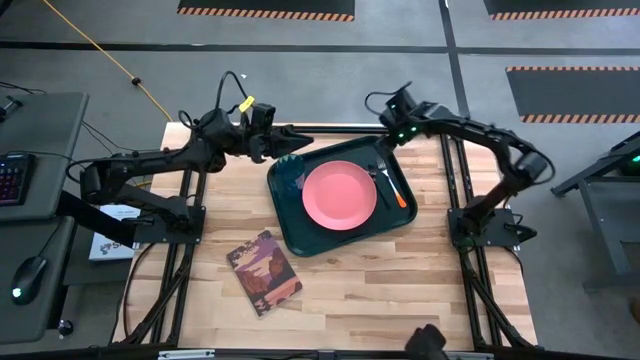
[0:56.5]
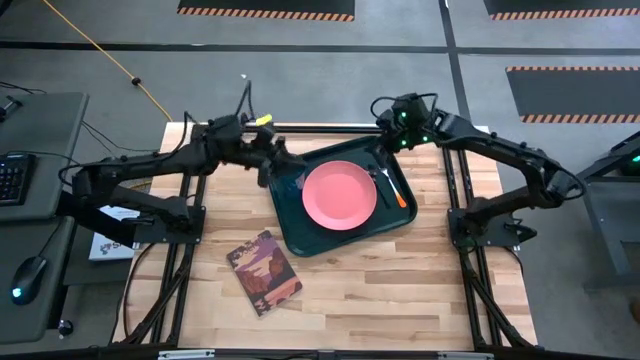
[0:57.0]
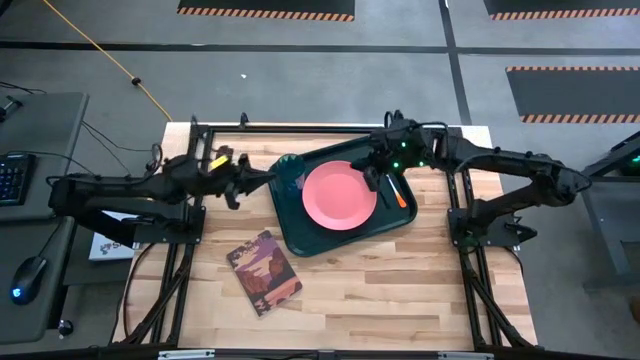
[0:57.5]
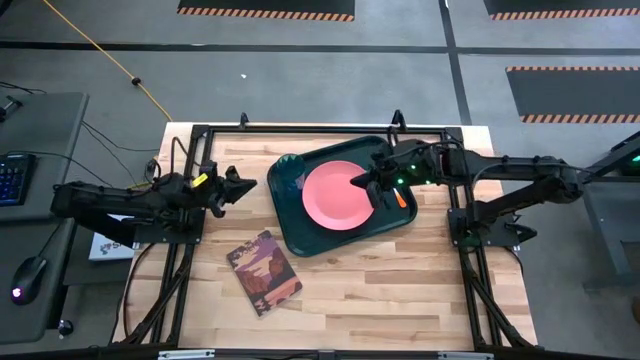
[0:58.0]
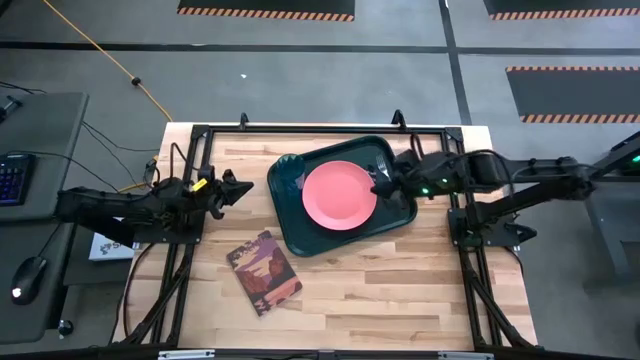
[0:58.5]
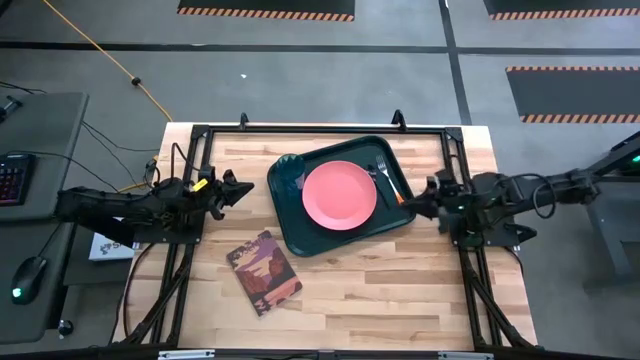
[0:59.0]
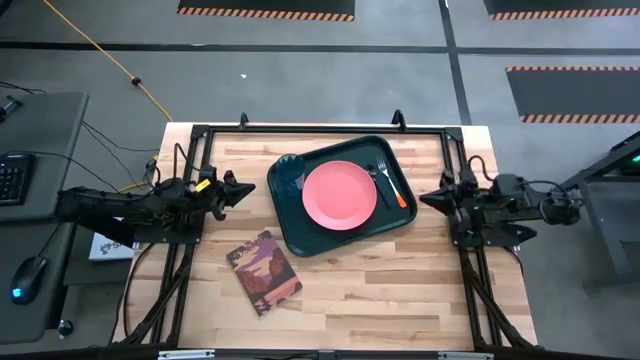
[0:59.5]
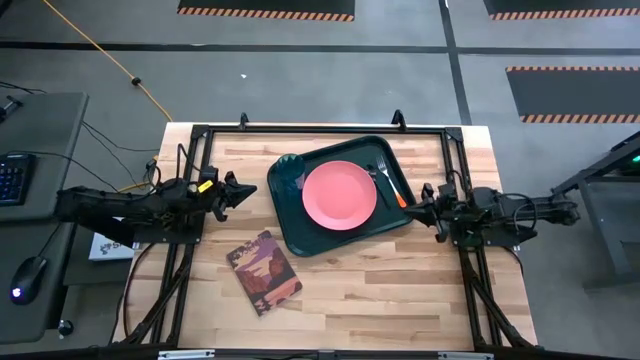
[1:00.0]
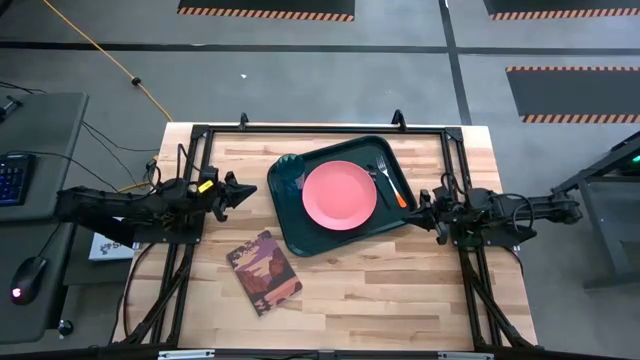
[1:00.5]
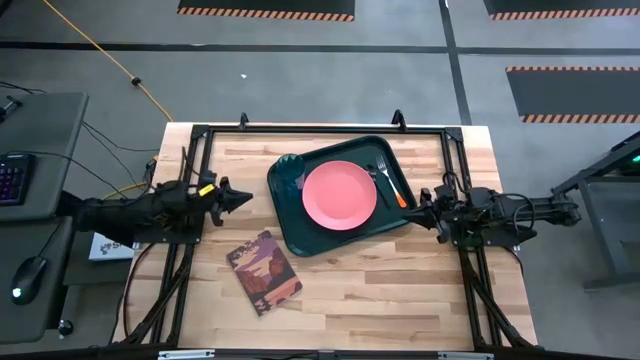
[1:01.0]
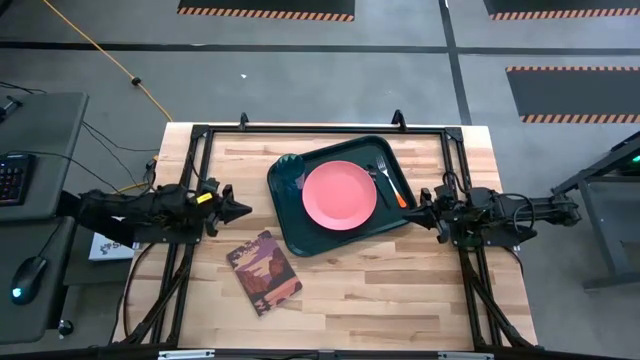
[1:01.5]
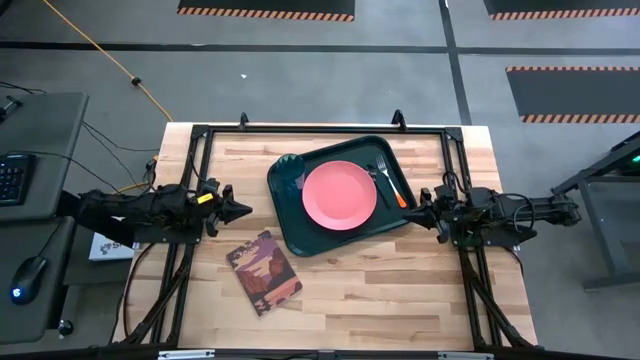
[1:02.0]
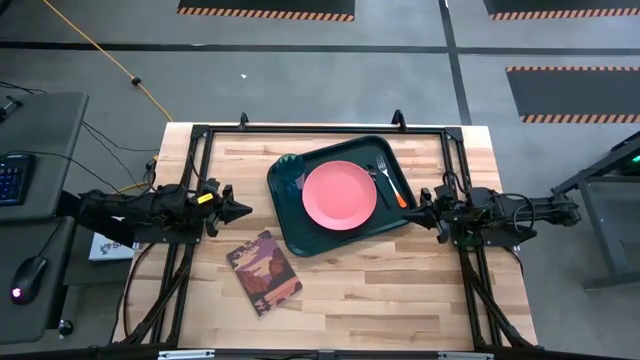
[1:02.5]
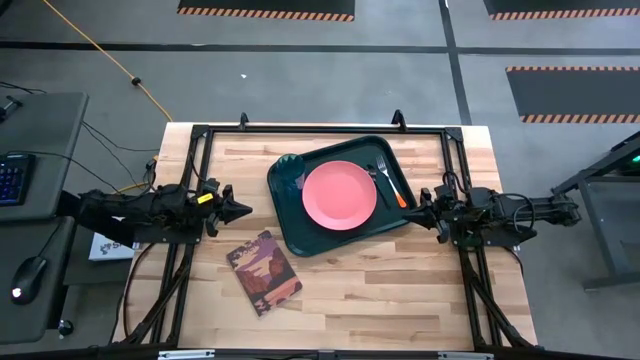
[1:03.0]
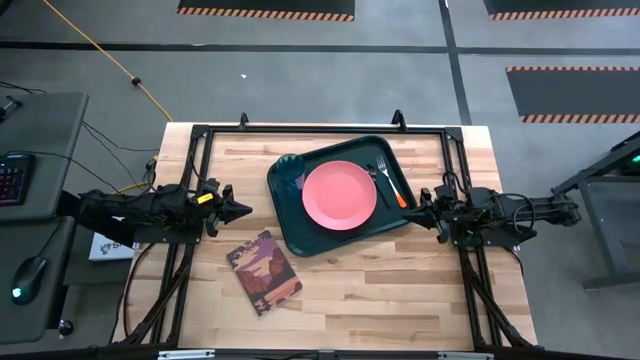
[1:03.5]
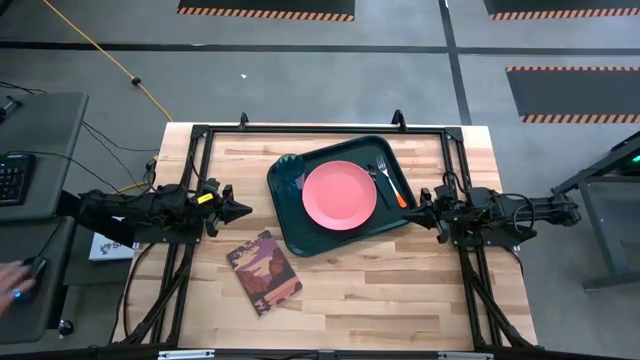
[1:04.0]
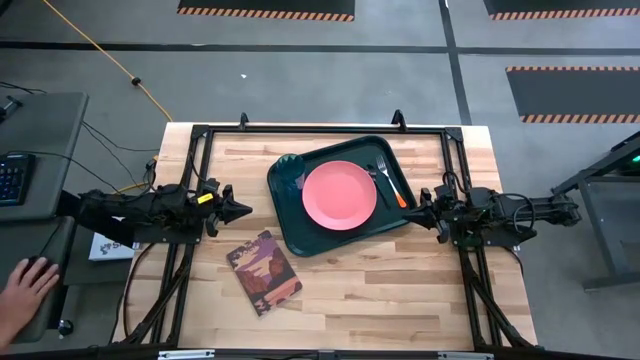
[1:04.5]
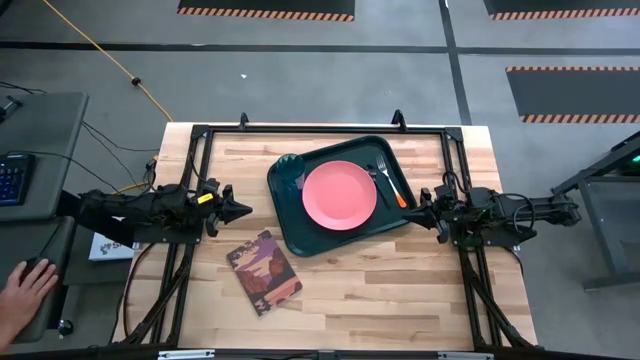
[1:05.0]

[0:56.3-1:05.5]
Task: Pick and place plate/cup/fork/spoon on tray
Return to Home Position

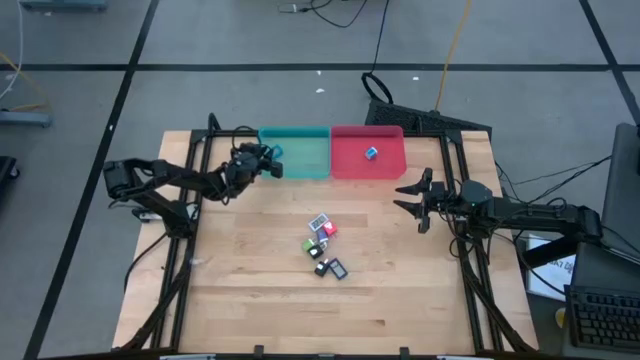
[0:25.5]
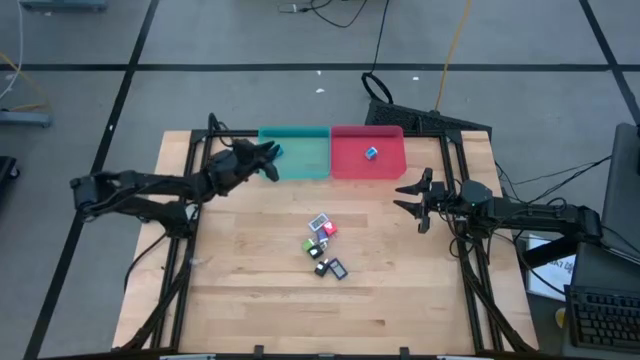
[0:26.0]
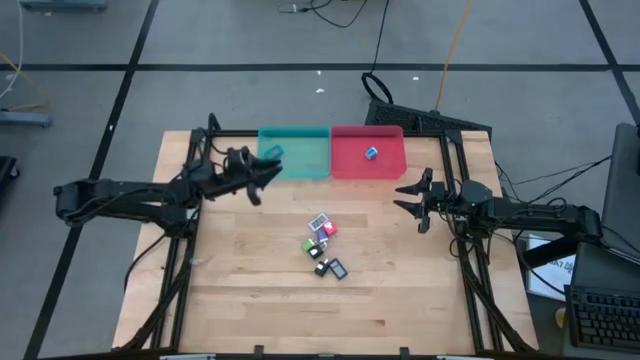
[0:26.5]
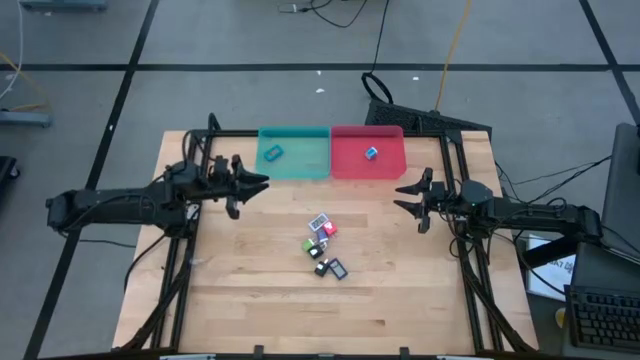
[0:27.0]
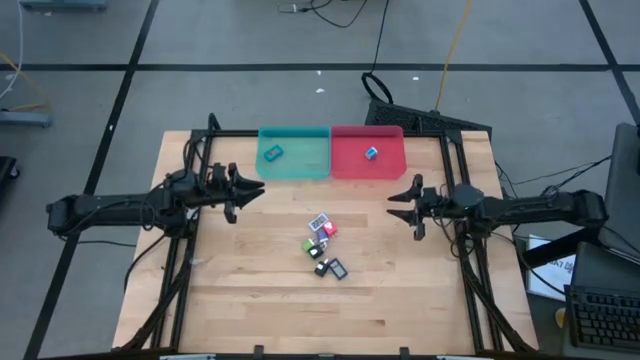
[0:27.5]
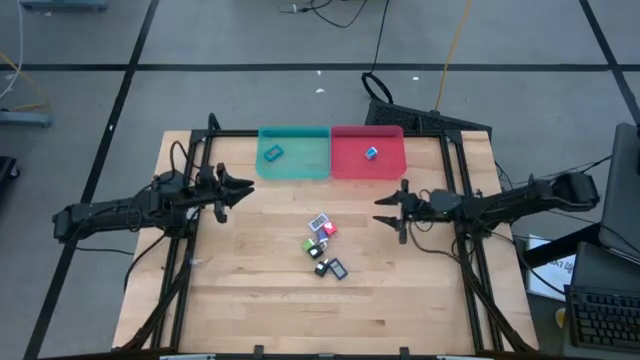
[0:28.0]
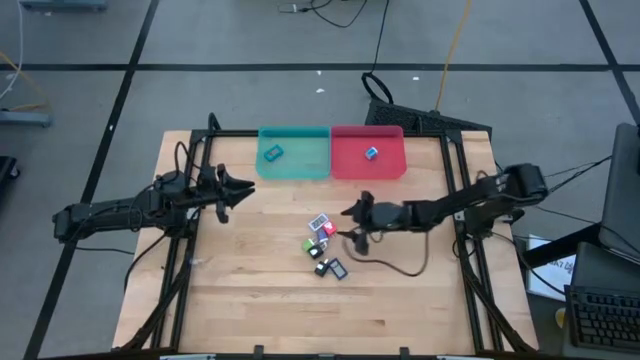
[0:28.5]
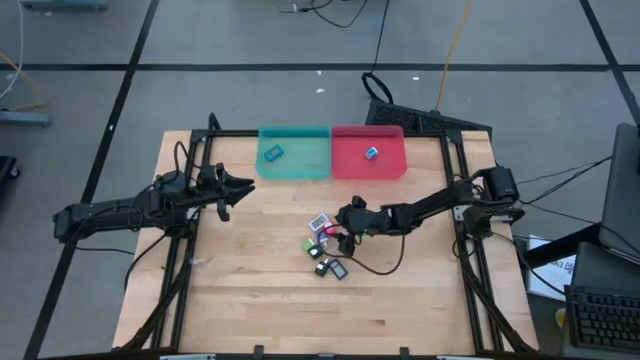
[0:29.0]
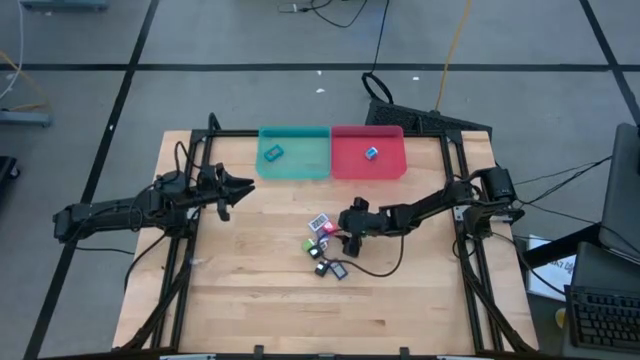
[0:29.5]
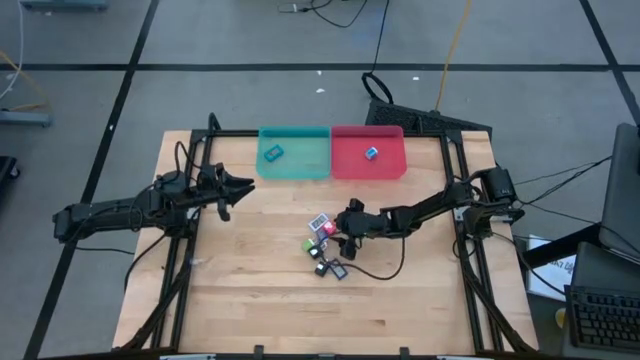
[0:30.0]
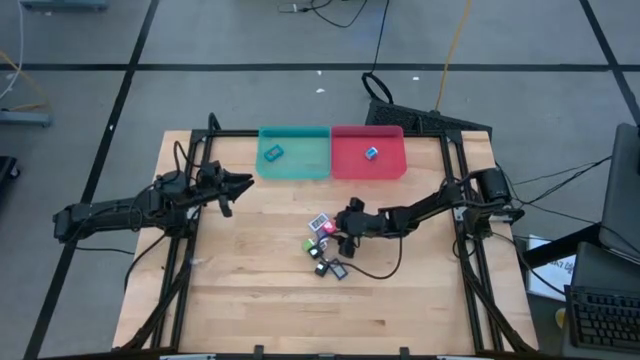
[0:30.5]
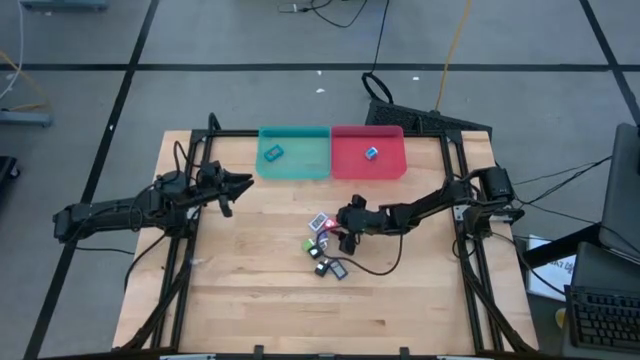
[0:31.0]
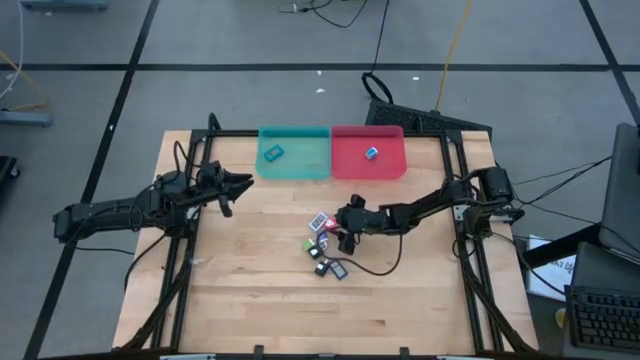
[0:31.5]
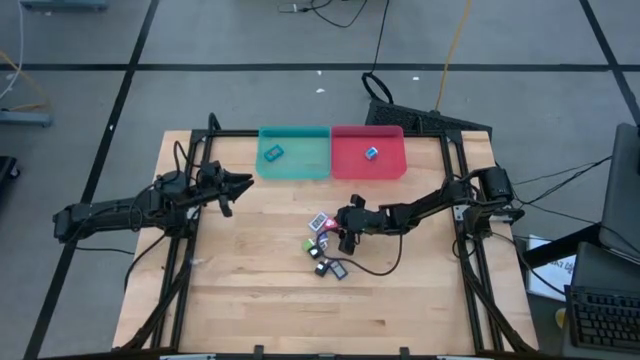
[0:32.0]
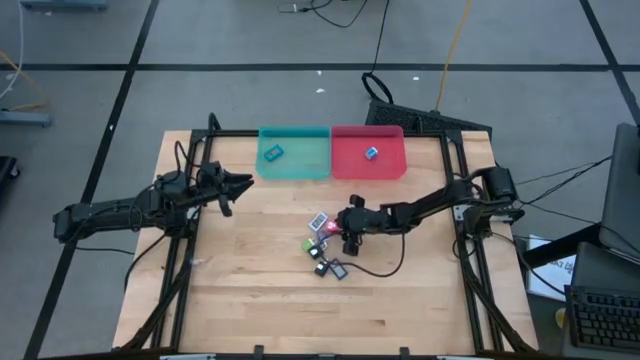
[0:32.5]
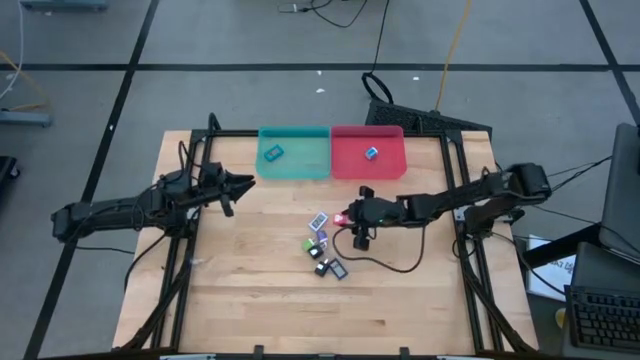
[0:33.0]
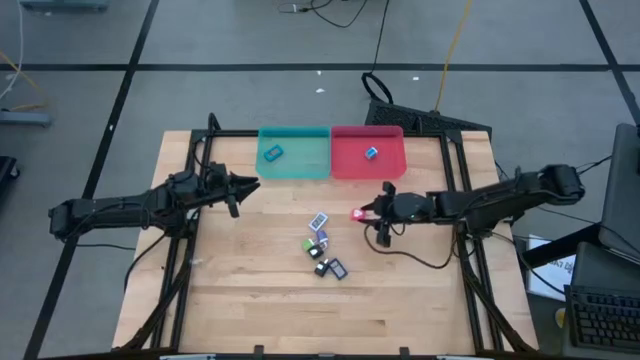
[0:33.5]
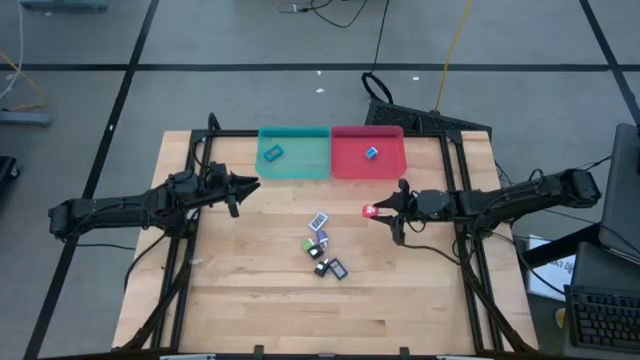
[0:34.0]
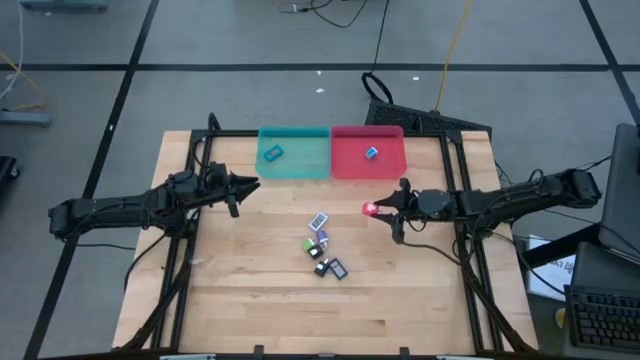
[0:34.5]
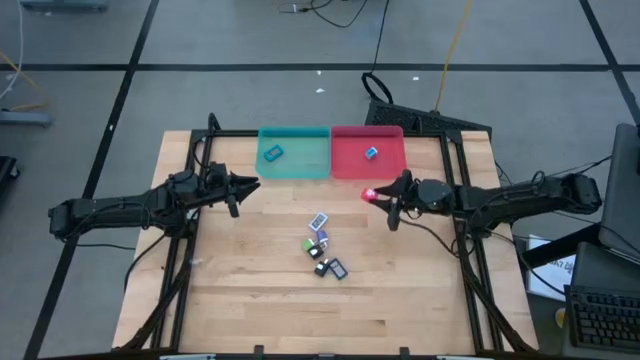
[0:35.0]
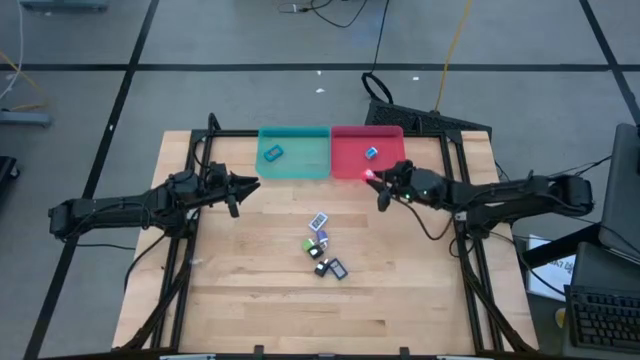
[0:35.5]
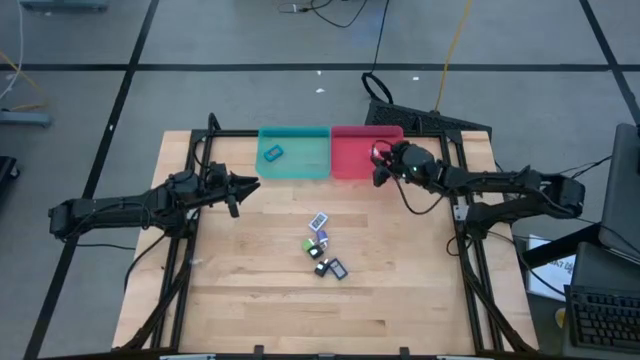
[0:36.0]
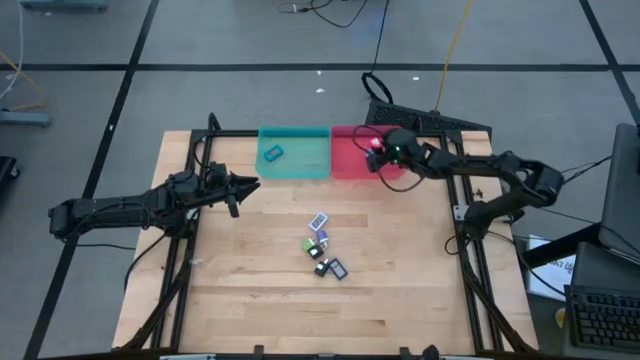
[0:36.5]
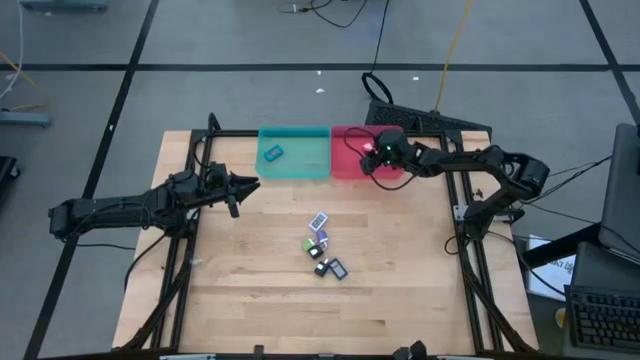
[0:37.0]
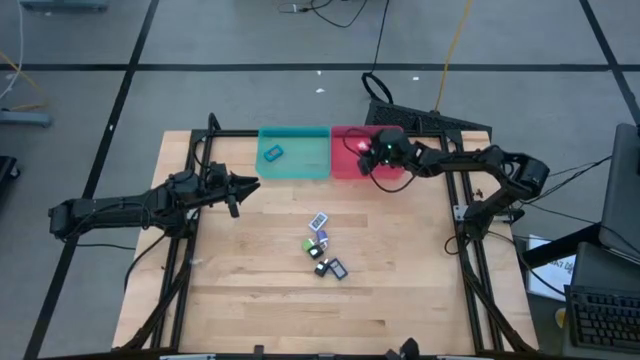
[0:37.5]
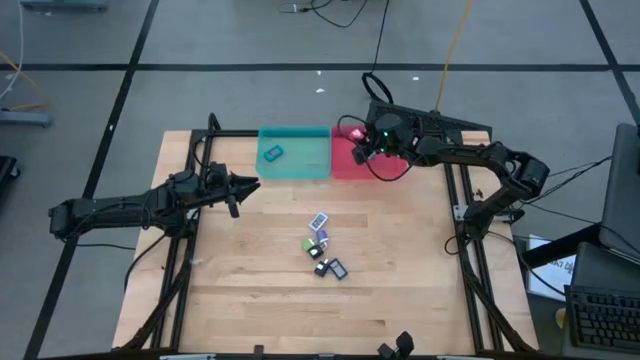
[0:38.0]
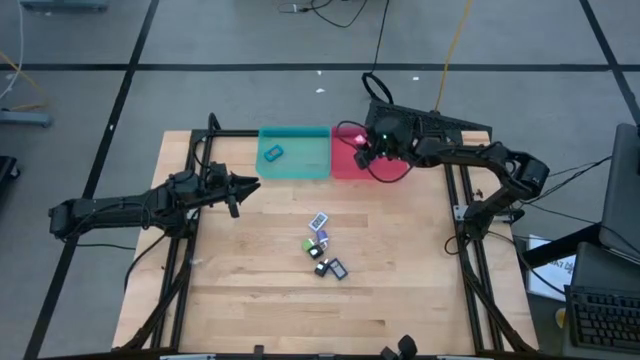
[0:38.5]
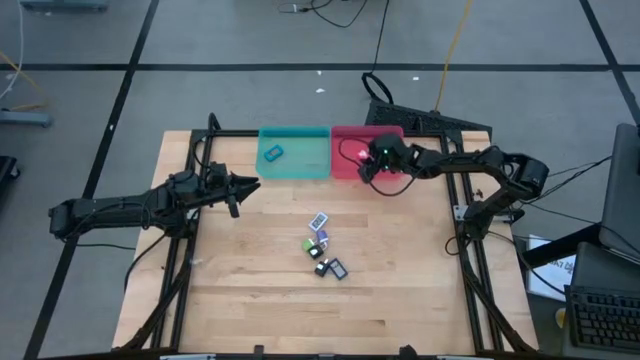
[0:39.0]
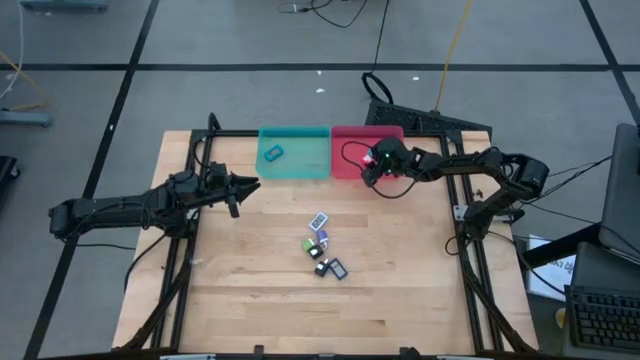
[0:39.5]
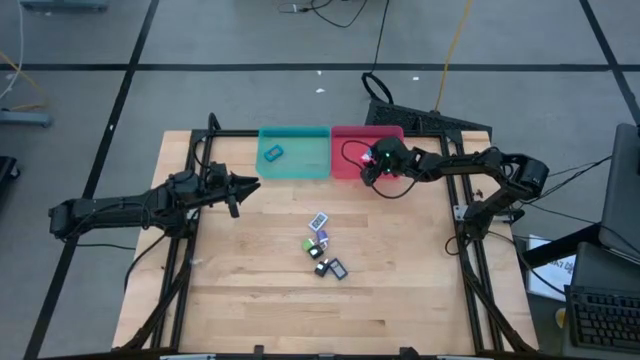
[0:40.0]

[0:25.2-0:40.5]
Task: Sort charging adapters and watches
Put the red charging adapter in the red bin
